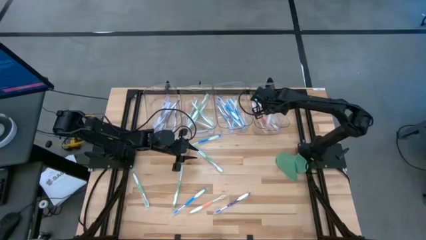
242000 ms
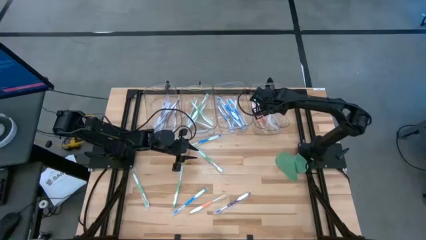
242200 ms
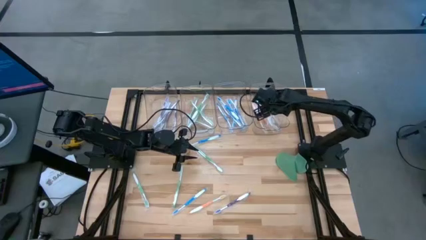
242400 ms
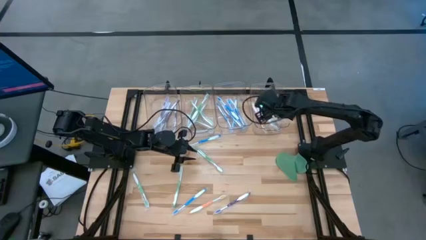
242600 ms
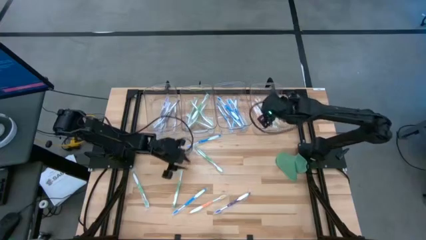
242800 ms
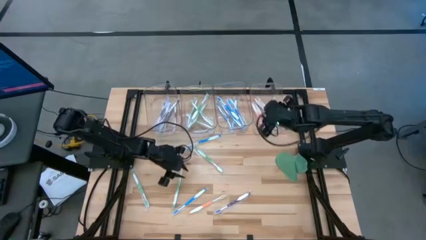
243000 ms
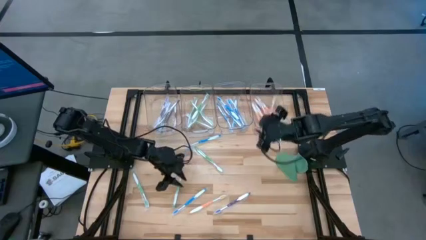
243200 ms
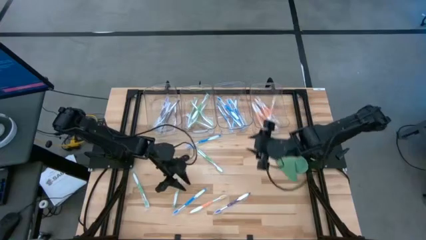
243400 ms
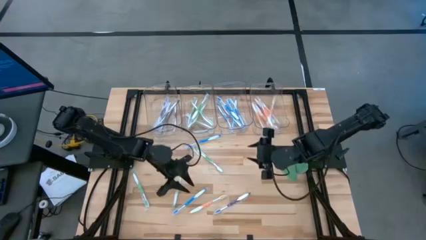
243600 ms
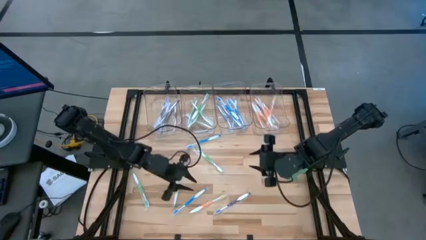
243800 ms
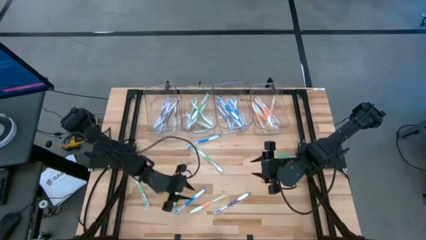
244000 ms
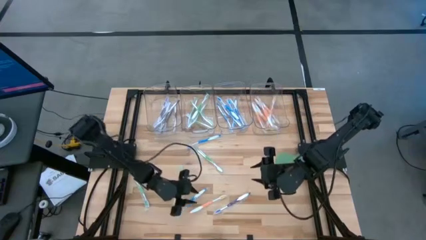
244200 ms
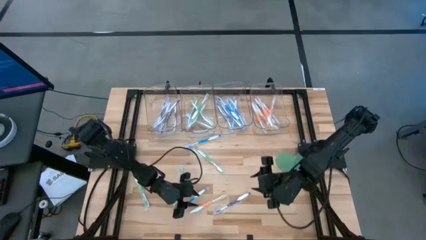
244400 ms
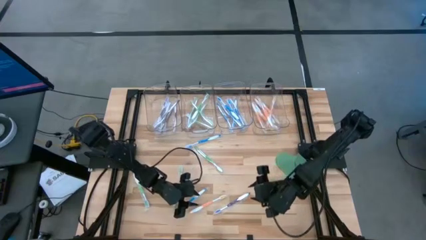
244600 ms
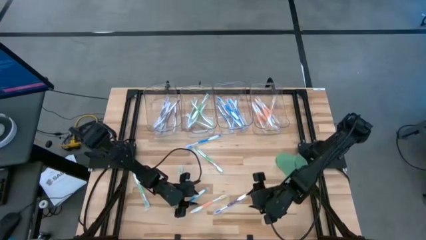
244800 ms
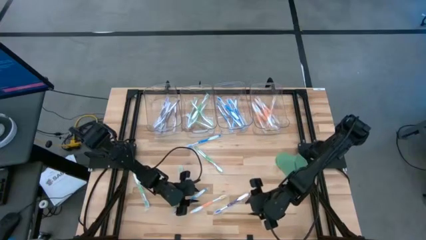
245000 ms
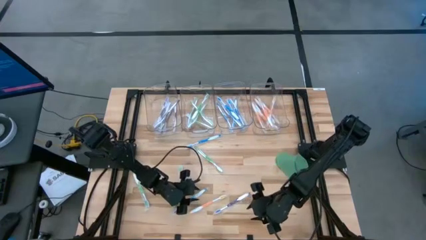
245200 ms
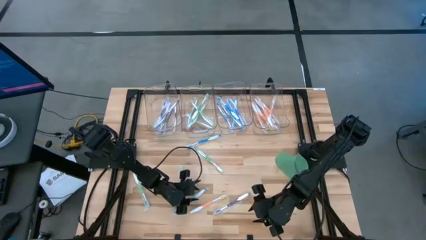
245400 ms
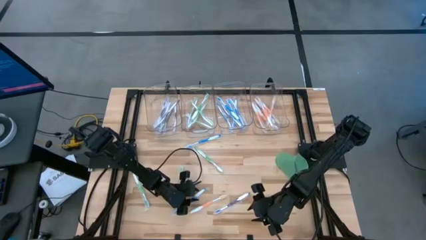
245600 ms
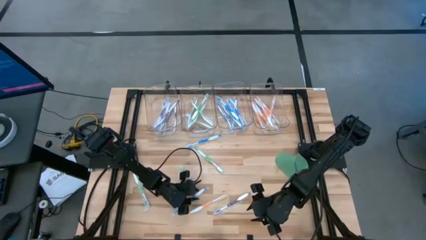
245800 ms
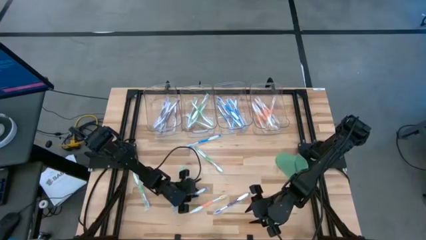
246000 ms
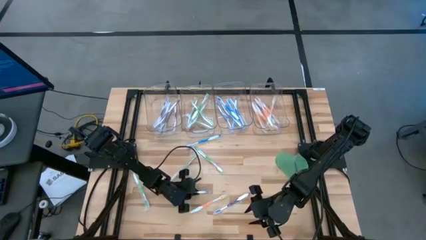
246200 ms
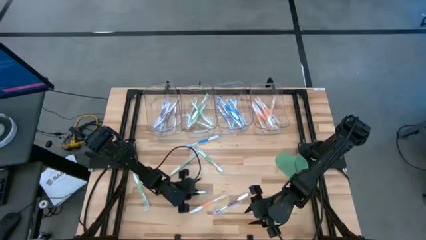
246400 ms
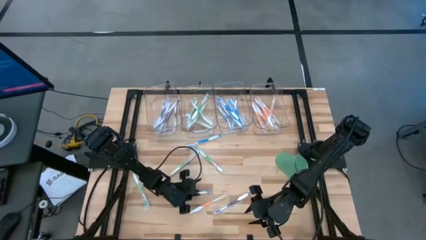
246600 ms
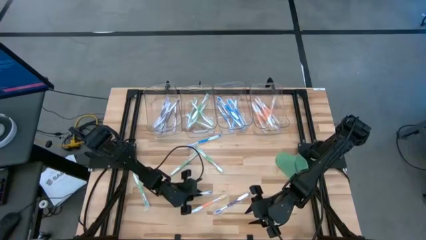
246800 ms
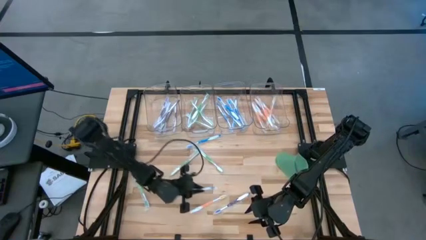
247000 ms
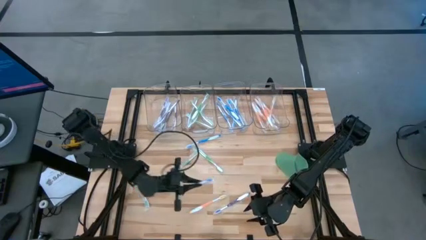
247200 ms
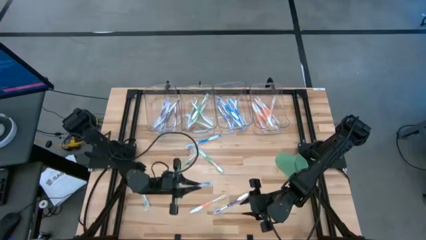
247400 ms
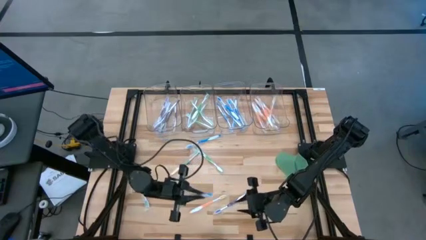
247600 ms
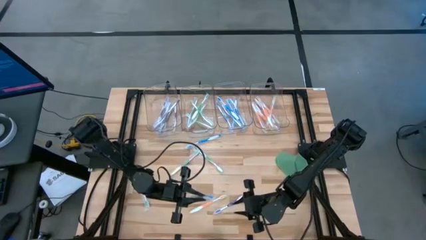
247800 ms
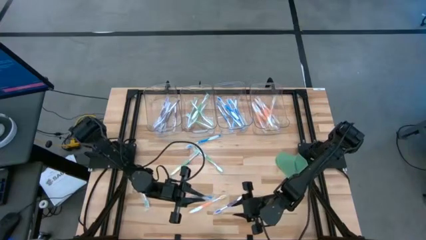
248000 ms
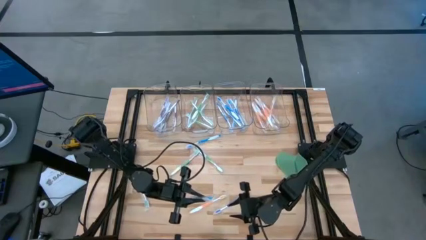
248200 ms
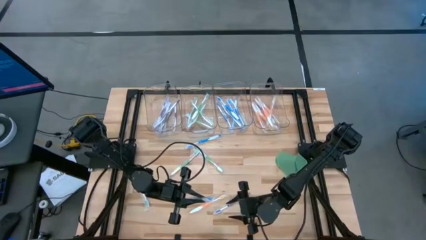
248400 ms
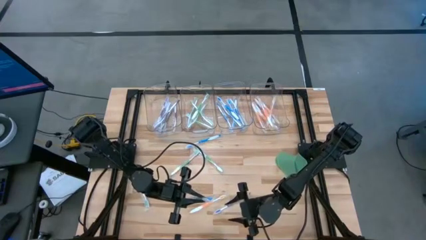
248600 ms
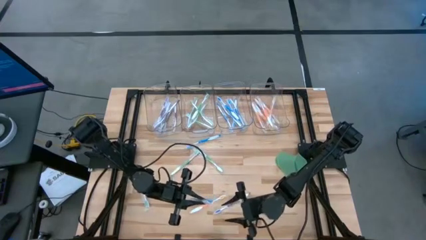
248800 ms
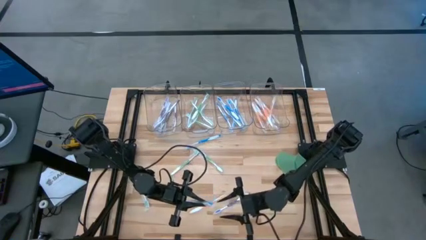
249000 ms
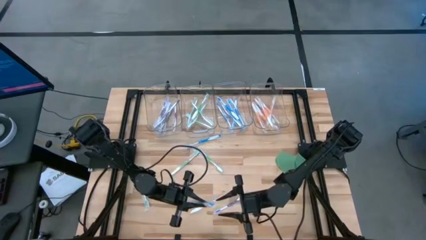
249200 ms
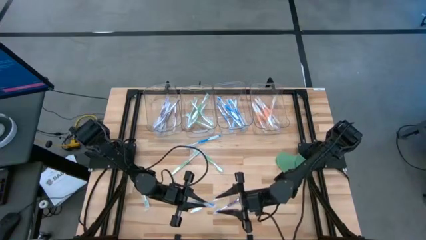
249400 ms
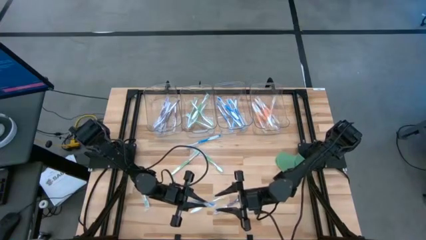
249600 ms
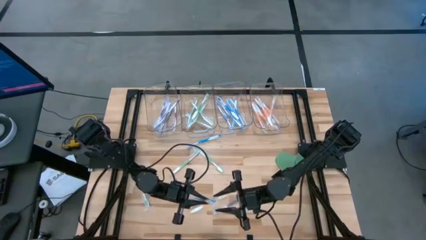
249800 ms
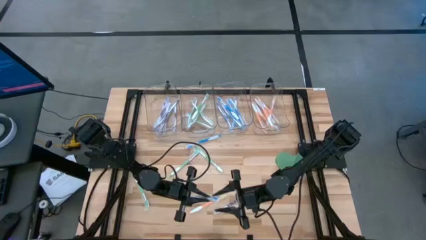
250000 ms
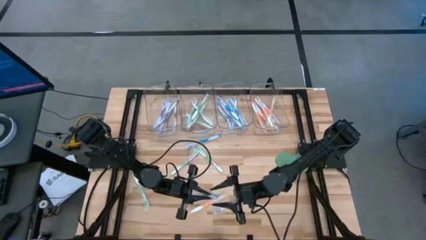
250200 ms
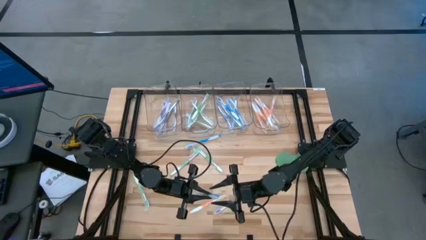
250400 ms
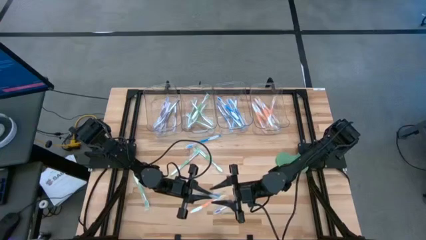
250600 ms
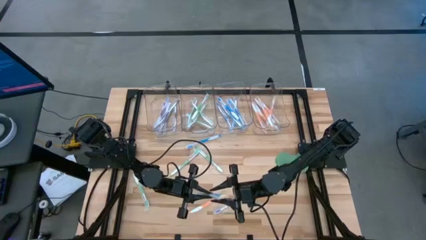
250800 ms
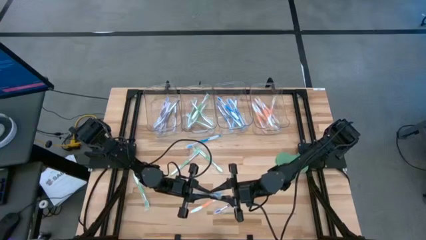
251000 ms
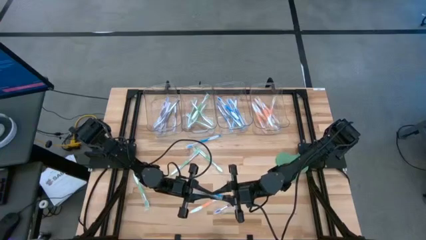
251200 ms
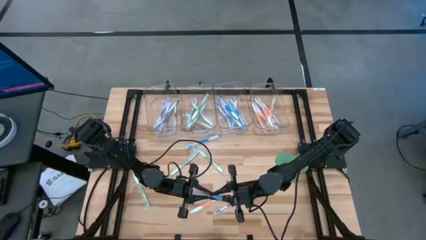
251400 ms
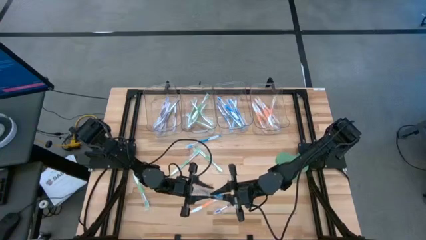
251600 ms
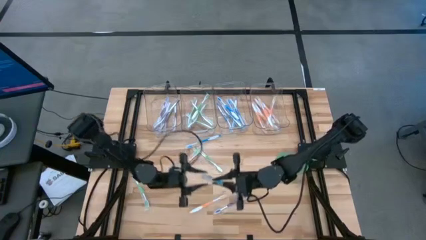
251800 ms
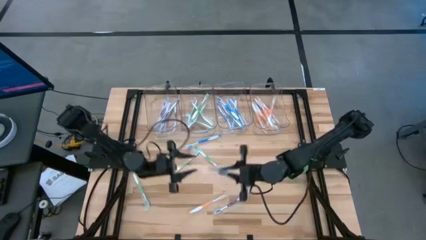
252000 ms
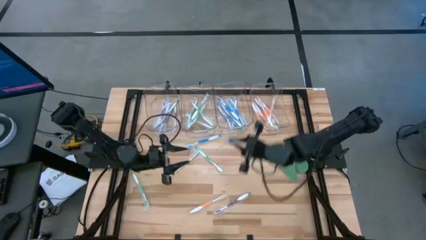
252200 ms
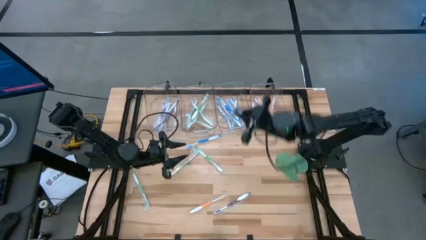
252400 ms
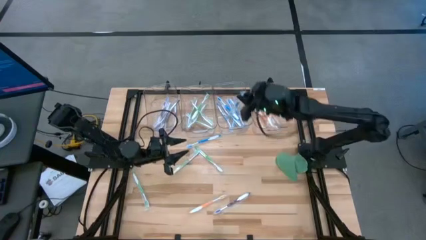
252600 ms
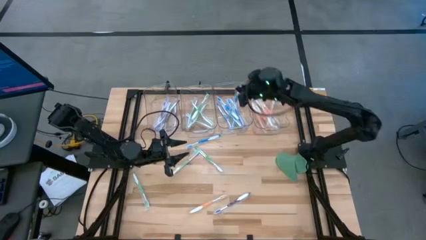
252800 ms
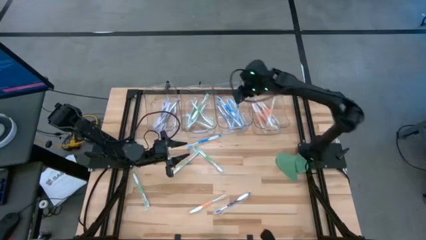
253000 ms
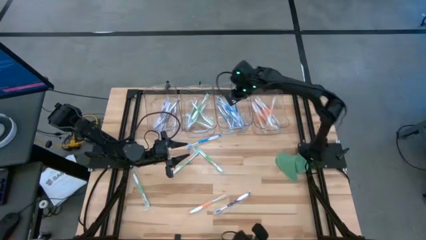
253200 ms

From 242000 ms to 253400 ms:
Task: Pick & Place Toothbrushes
Put the blue toothbrush into the middle right transparent bin

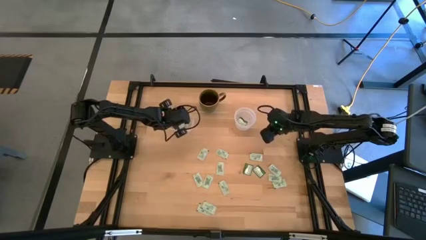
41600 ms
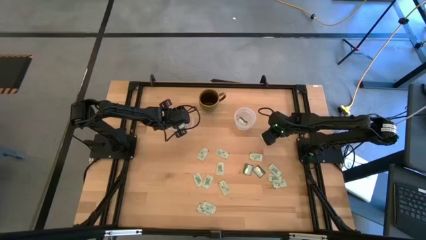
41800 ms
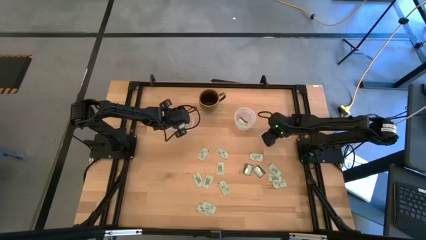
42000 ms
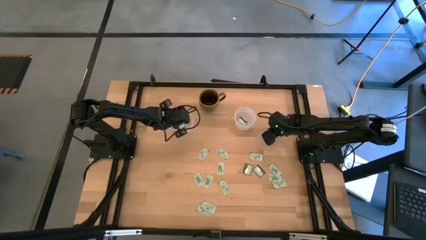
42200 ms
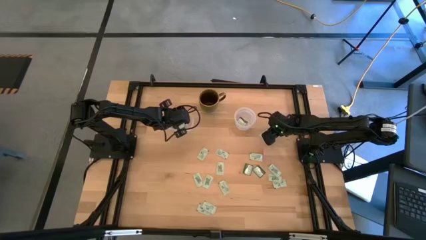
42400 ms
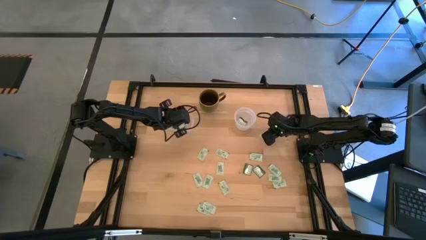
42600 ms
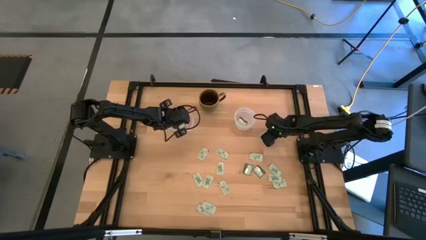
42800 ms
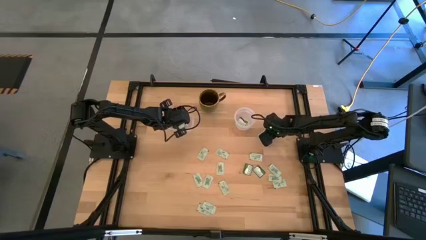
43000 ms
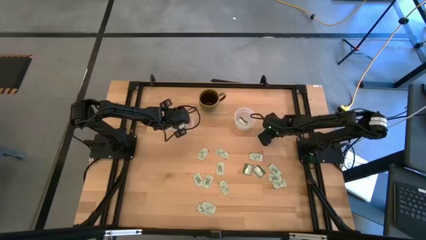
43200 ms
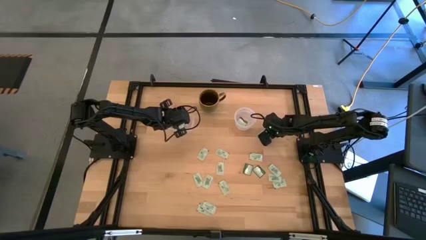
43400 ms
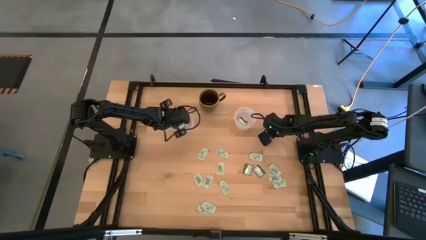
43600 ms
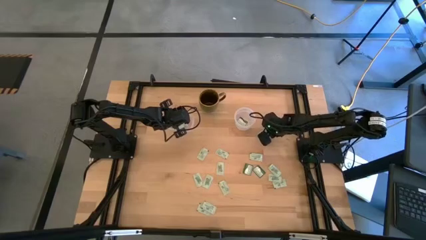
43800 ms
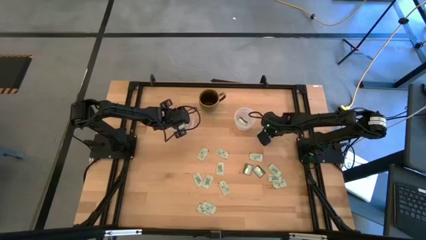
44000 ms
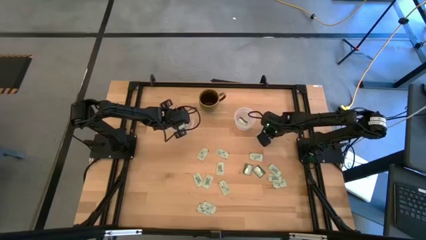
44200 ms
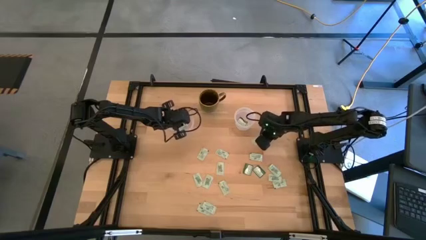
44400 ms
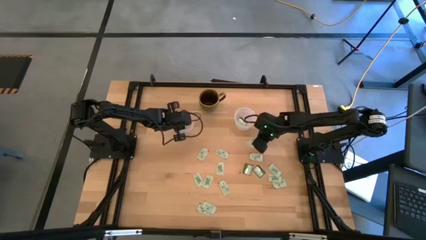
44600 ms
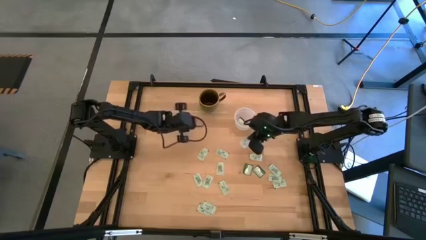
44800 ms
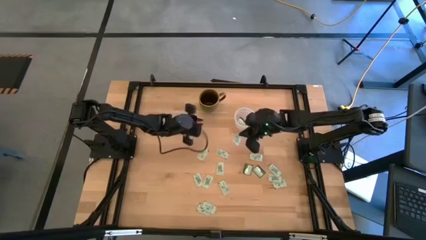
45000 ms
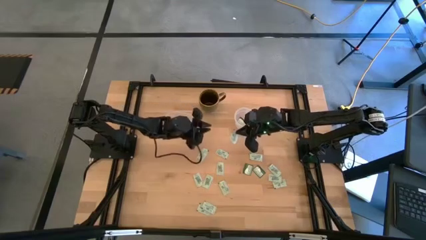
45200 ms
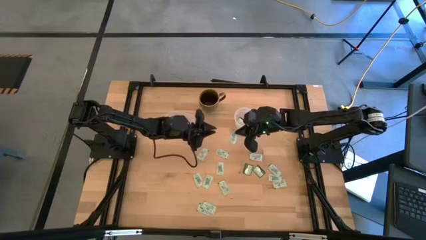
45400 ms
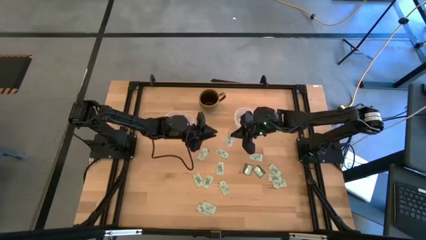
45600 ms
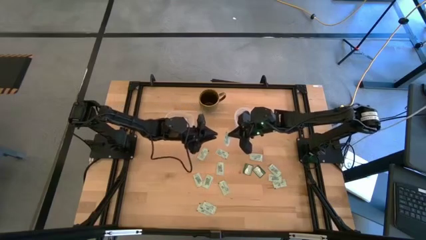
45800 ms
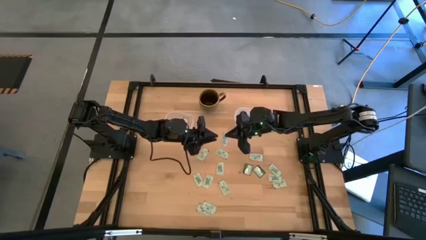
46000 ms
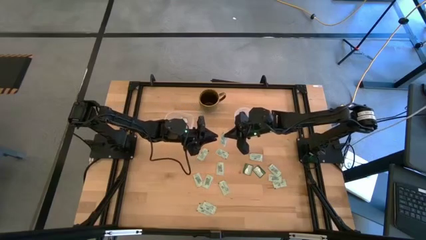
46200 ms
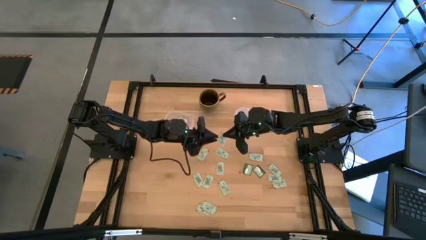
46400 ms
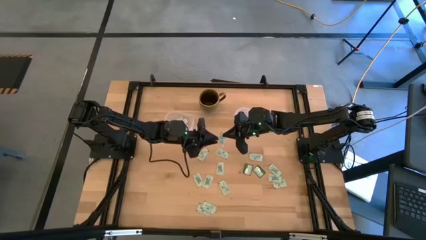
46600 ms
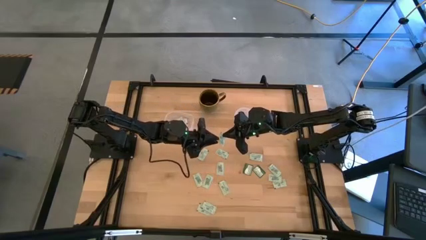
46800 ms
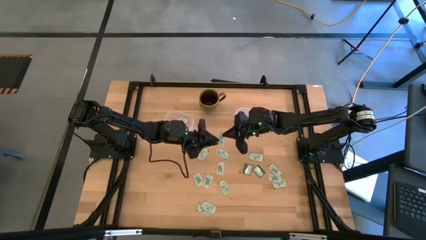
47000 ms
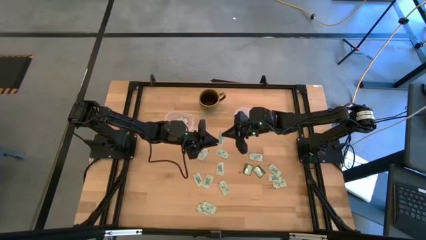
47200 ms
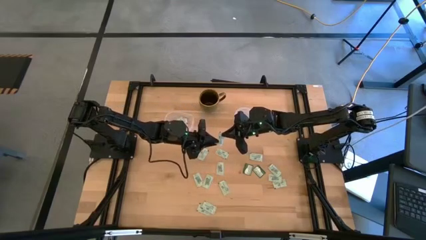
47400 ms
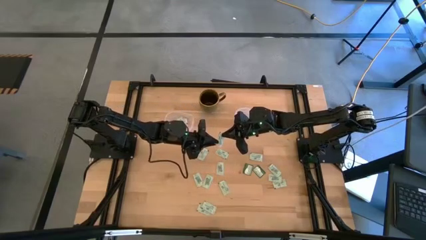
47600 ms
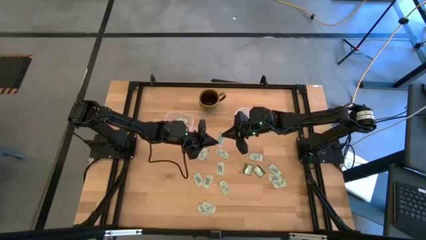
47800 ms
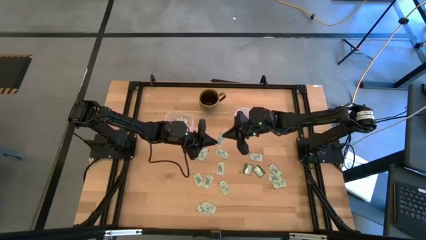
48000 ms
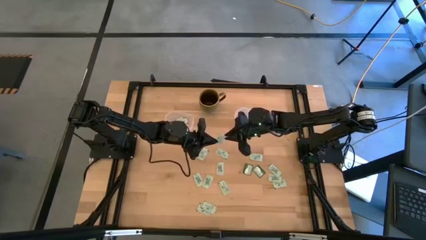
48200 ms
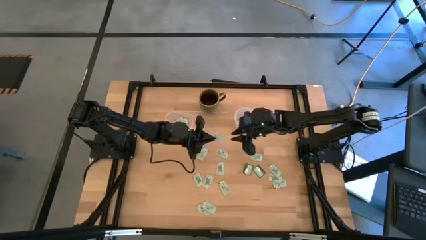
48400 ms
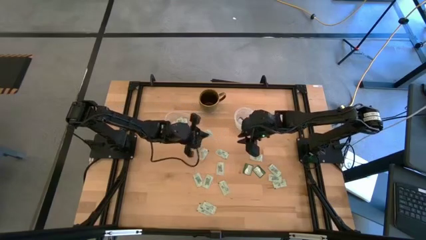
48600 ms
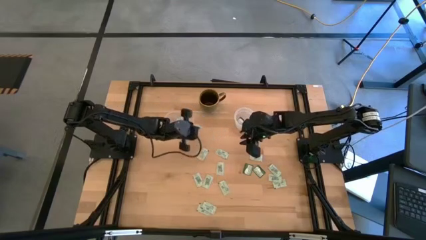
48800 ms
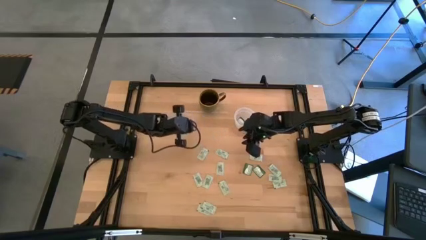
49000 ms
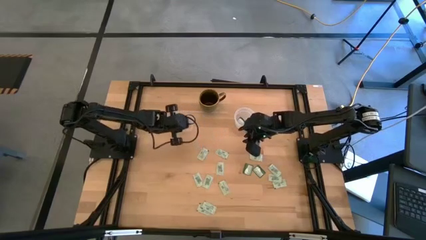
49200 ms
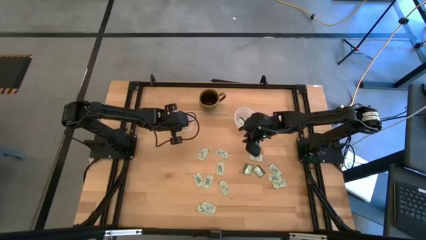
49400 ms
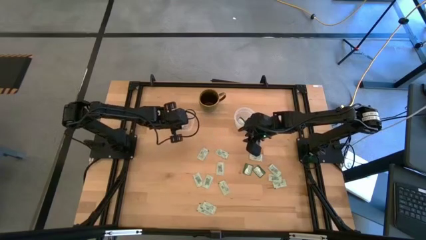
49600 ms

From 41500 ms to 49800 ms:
Task: Pick and place Stevia / Truvia into bins
Put the light green stevia packet into the left transparent container
